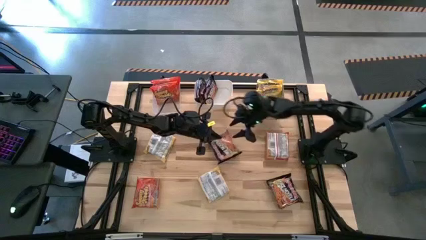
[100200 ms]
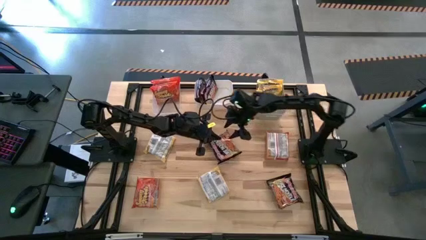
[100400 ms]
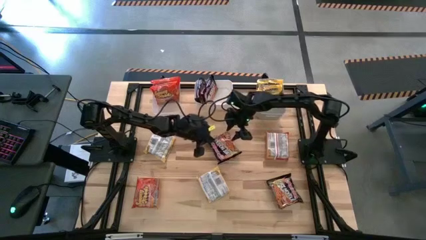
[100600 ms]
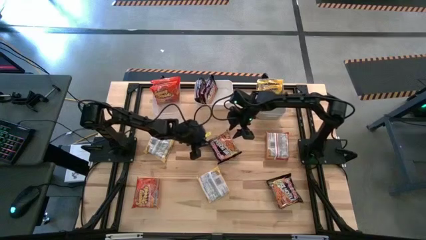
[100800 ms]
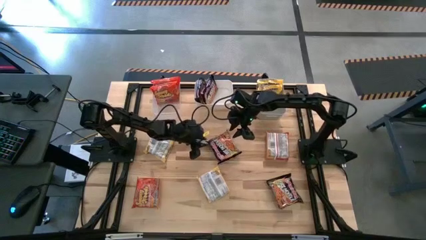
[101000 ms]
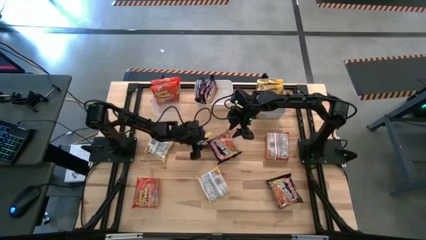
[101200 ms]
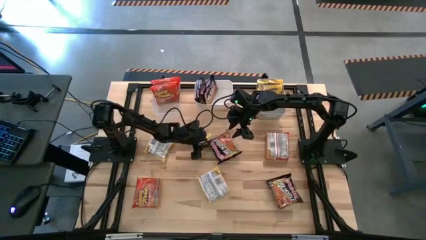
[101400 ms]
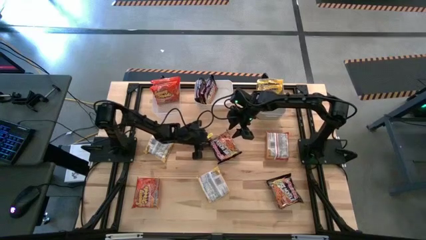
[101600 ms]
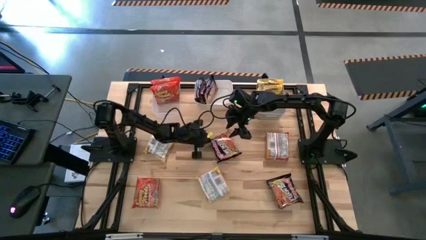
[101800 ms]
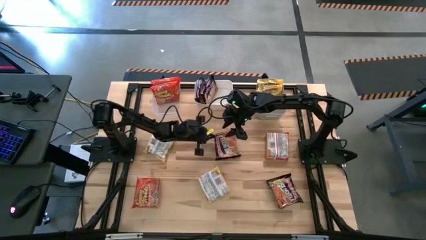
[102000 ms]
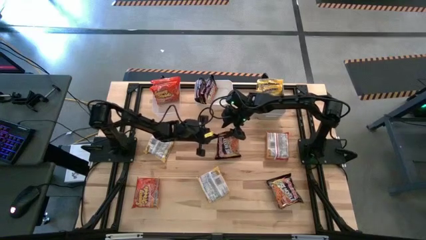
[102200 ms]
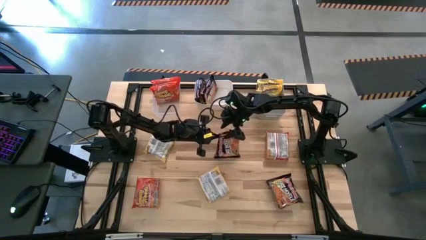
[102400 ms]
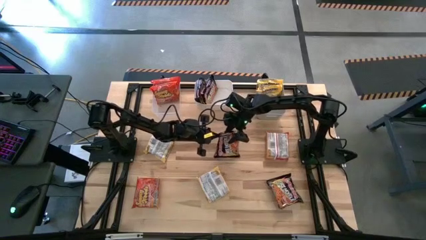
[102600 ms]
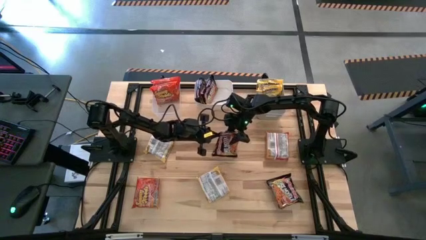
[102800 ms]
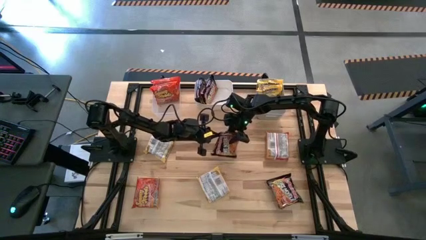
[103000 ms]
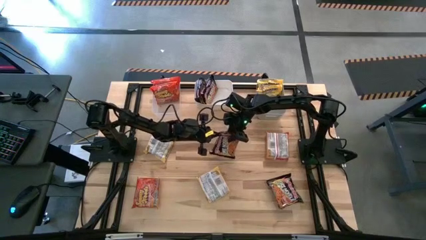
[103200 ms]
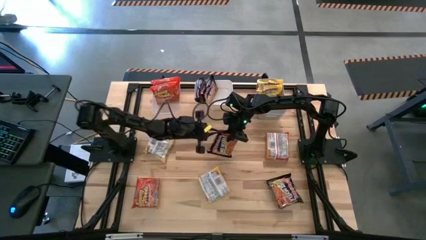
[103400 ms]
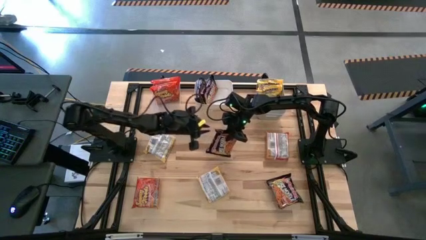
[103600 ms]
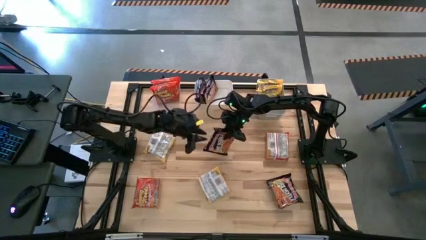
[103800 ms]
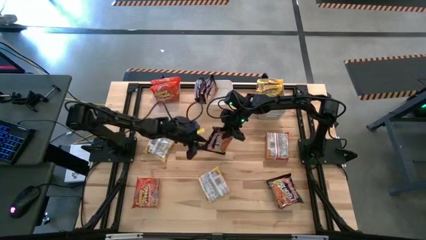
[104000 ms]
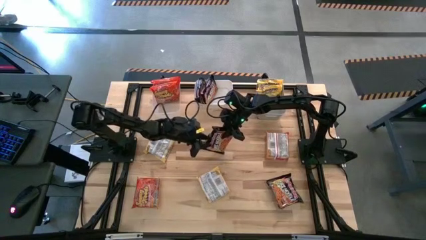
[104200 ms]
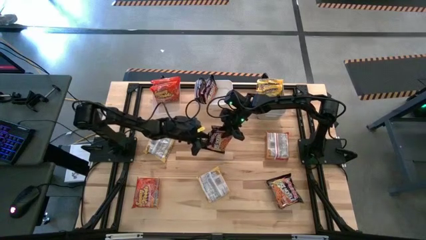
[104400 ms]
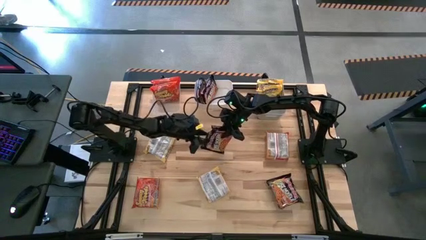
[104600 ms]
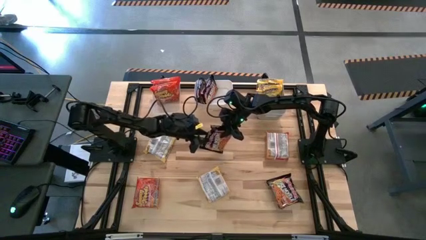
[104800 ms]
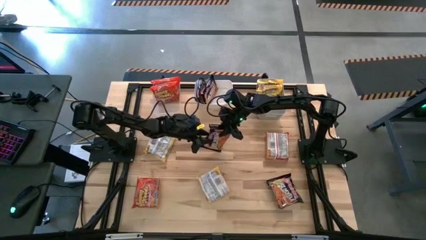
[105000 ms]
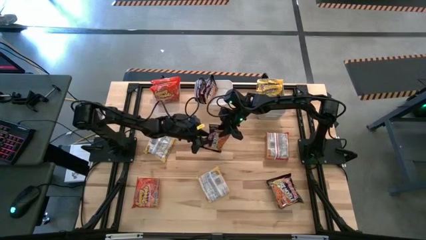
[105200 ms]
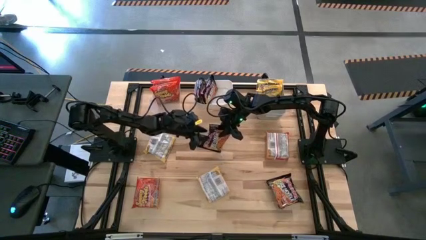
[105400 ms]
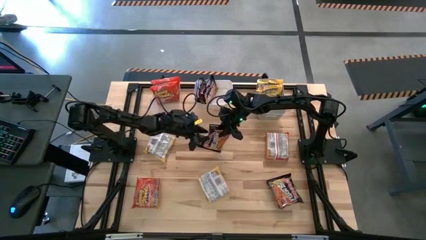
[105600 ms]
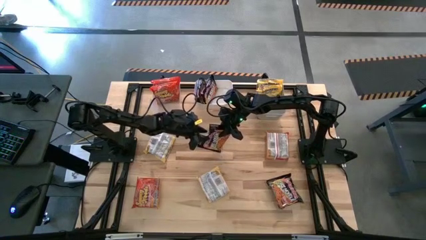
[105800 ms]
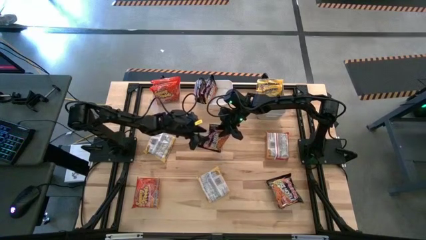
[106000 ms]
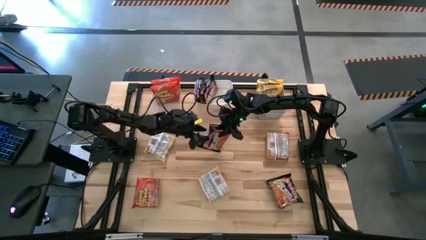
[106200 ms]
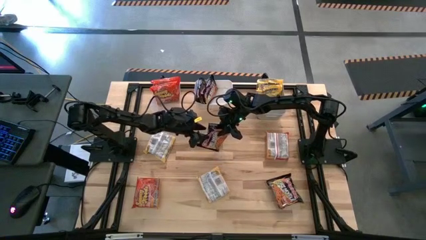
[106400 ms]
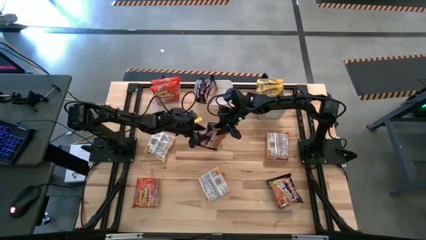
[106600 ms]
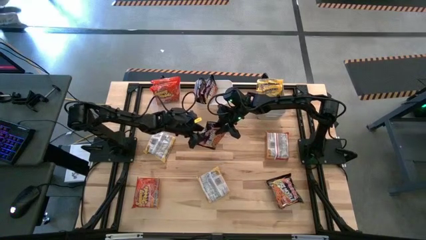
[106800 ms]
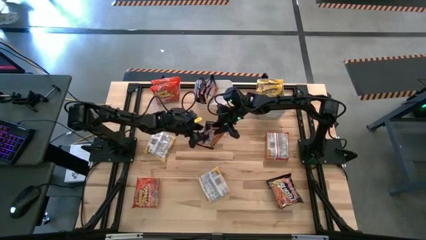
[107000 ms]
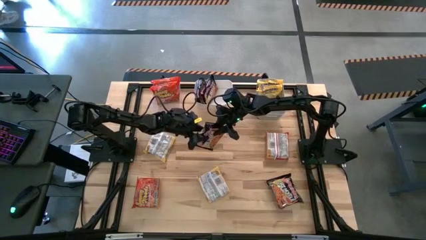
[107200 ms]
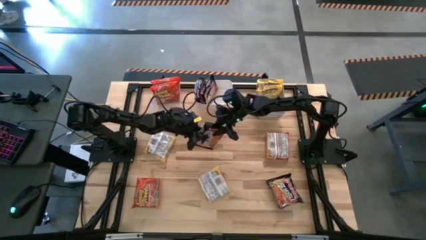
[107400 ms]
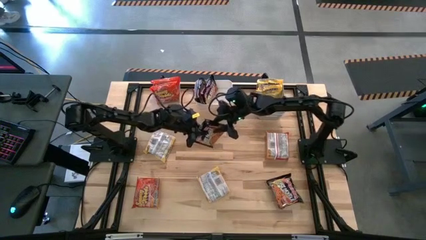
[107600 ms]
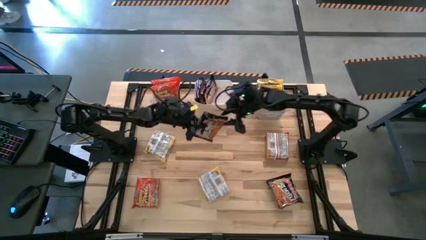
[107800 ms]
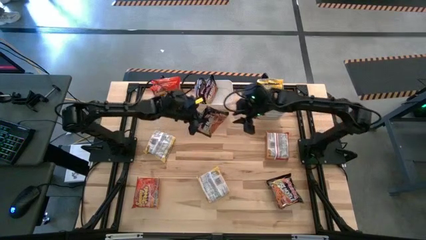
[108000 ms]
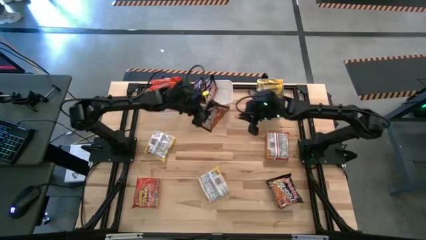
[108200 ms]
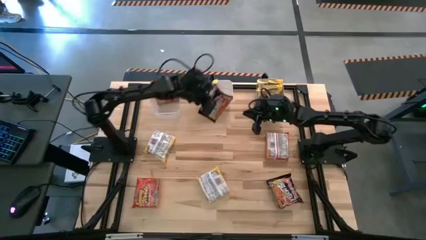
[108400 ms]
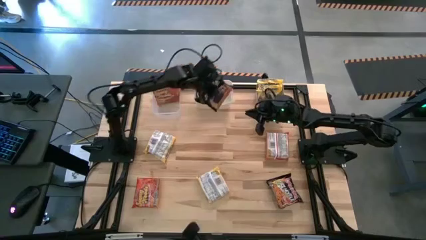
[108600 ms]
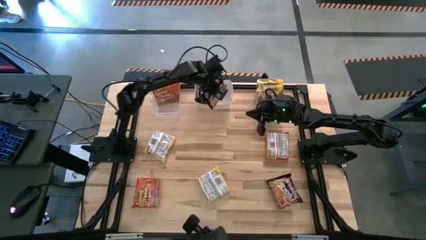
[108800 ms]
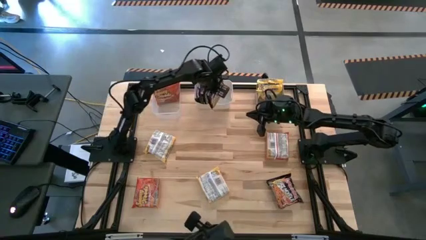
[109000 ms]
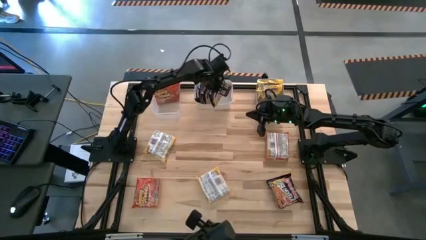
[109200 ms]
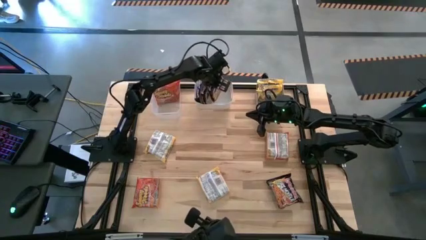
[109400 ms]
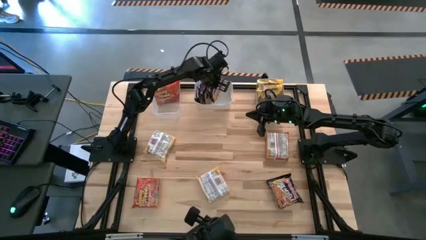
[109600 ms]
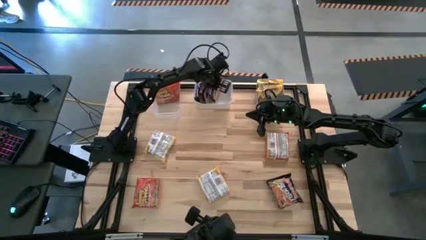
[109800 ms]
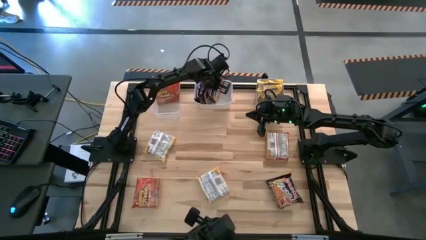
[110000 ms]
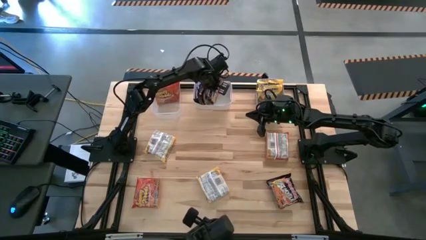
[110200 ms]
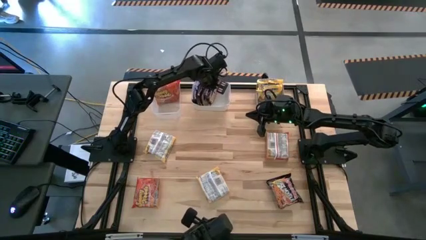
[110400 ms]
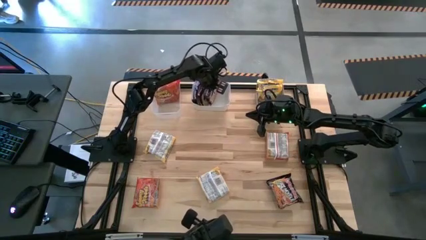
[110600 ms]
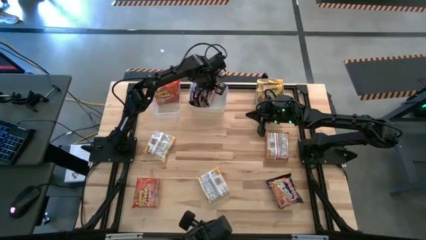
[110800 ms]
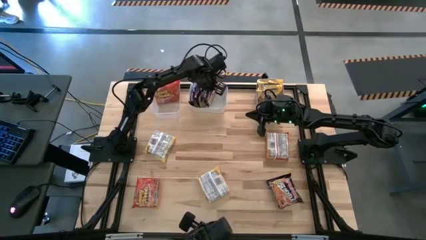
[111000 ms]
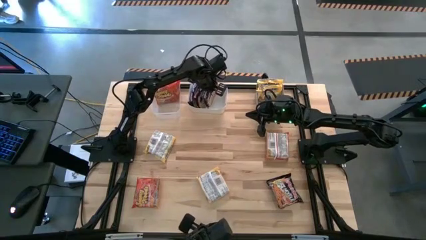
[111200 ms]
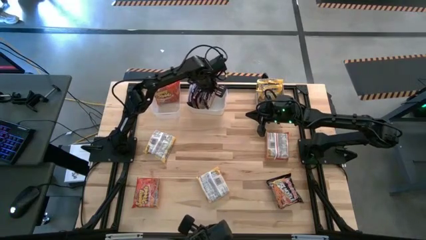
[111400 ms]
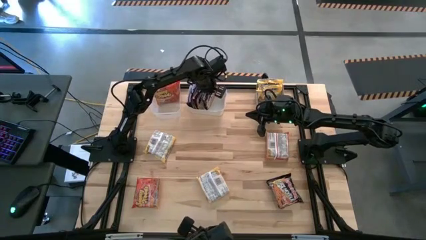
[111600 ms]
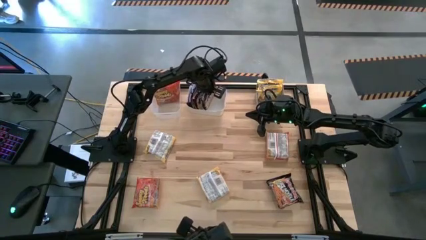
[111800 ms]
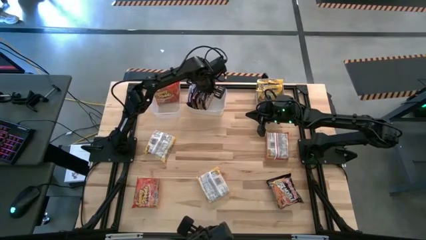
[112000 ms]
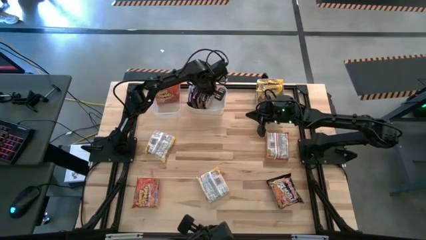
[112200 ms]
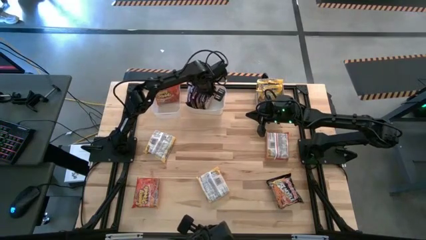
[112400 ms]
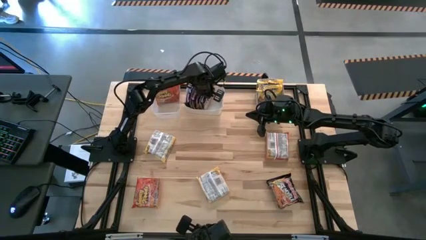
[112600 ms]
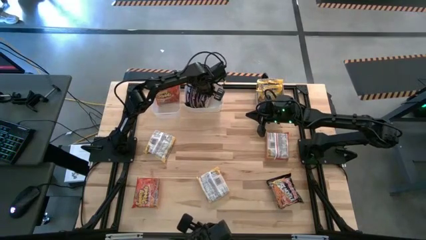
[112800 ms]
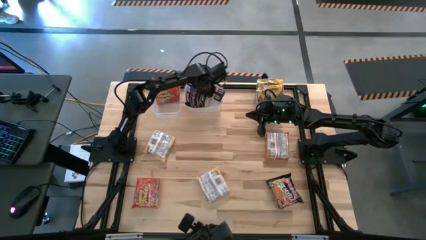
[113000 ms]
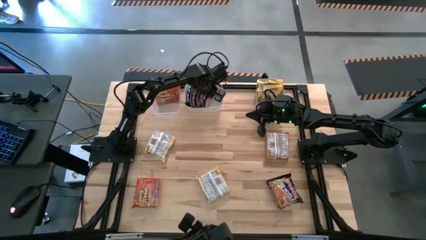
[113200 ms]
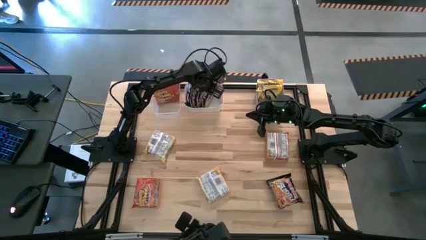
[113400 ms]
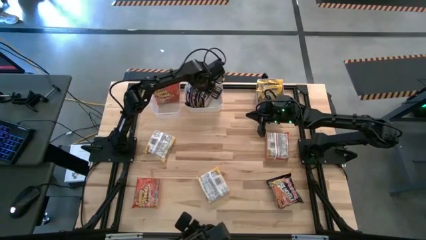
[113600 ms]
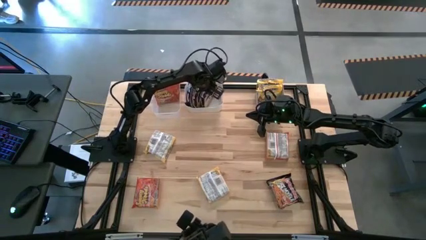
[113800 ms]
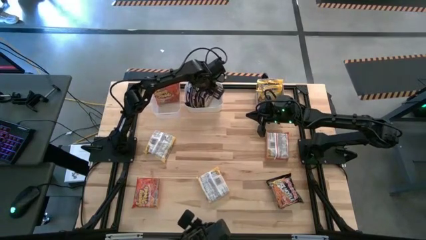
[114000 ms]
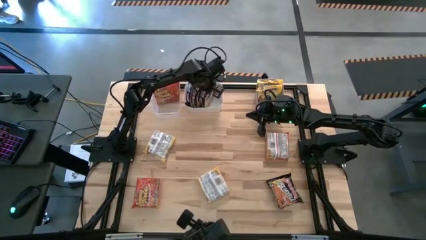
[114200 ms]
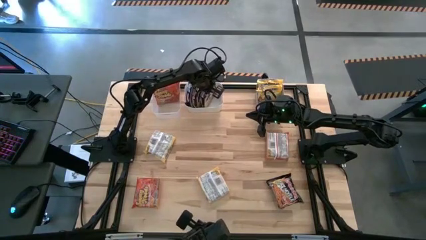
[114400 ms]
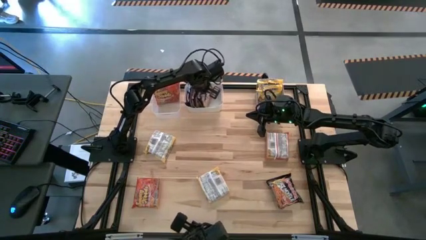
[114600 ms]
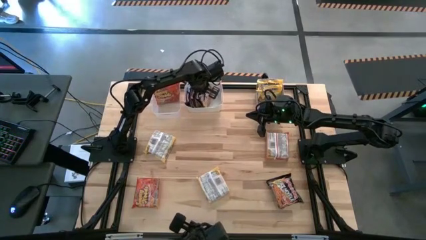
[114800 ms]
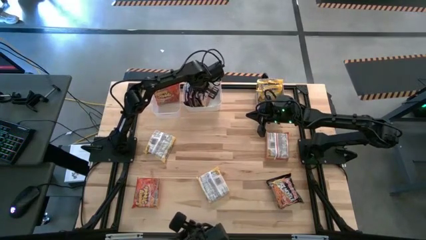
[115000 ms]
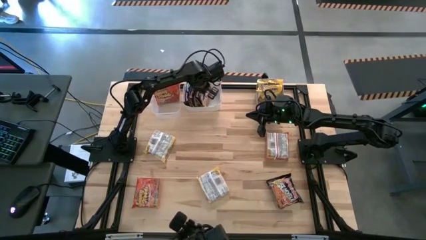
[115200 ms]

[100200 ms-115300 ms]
Task: Sort Maruchan noodles
Put the black noodle pack into the white bin

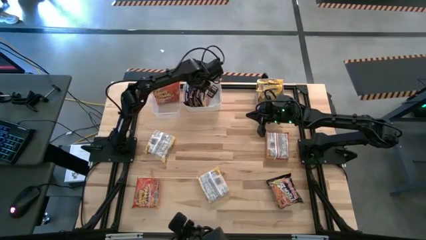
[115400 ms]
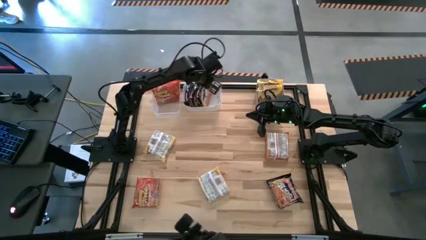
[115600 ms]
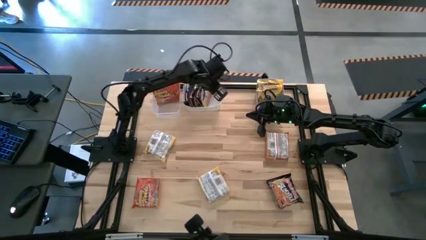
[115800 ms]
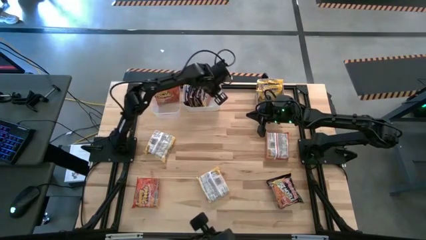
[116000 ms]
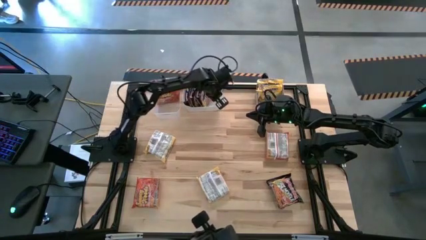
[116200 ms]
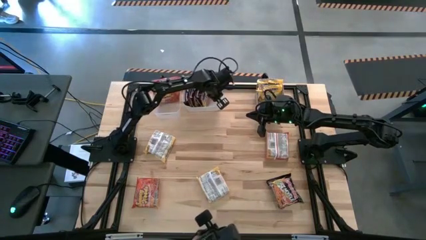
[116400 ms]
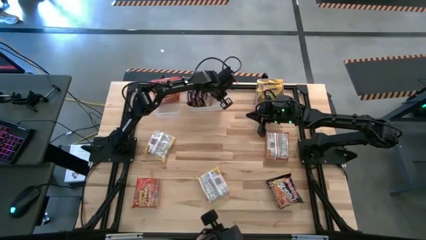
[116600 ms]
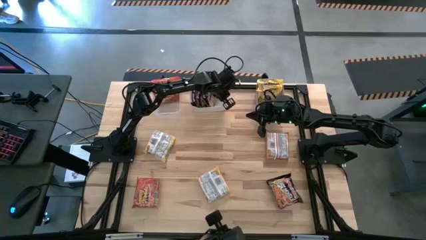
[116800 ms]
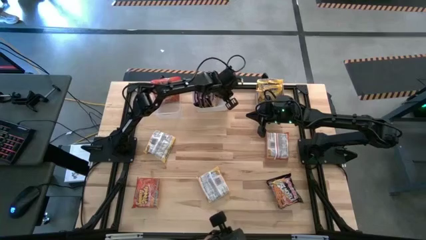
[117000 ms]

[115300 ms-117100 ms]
Adjust the white bin
